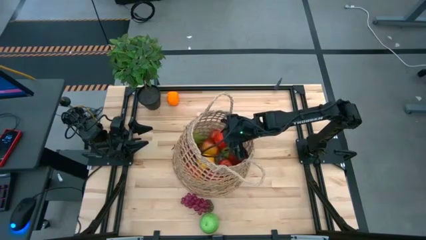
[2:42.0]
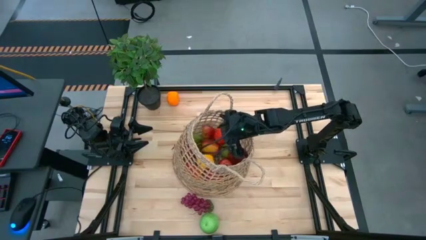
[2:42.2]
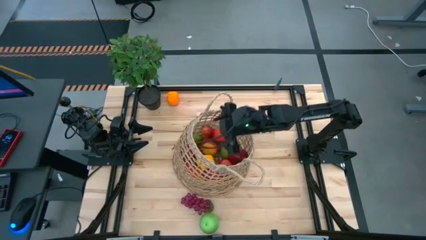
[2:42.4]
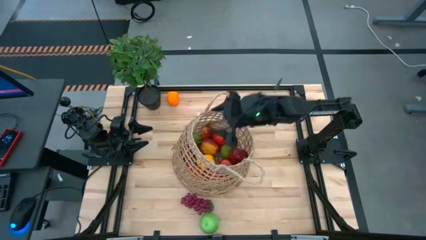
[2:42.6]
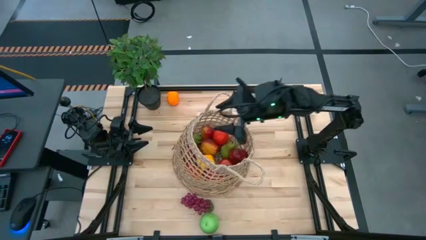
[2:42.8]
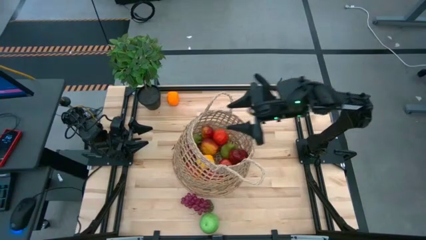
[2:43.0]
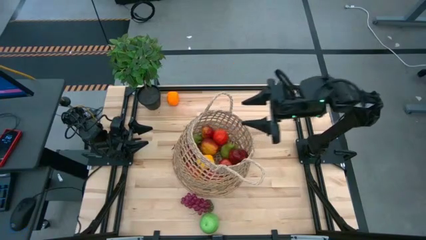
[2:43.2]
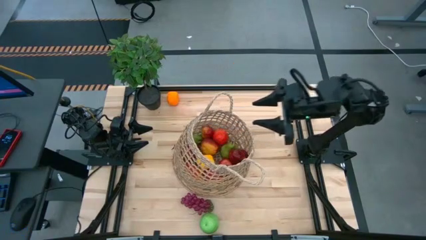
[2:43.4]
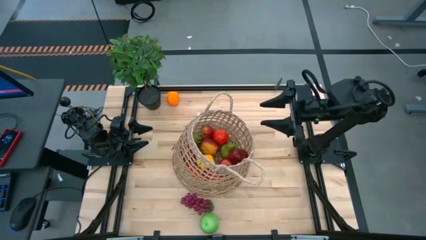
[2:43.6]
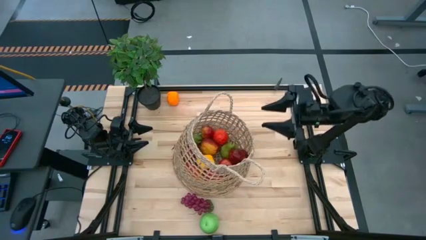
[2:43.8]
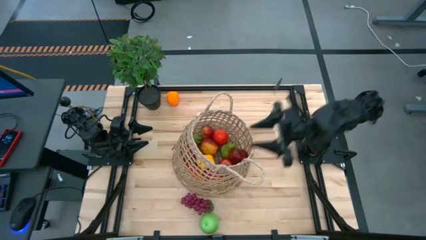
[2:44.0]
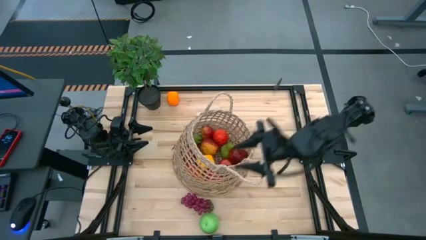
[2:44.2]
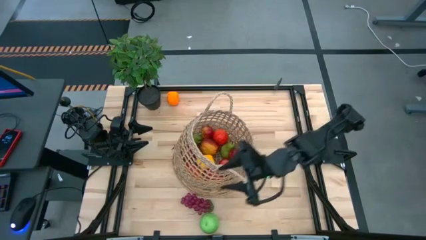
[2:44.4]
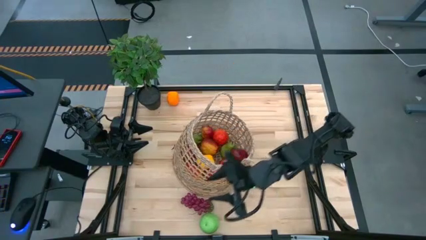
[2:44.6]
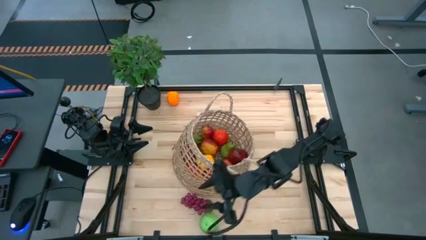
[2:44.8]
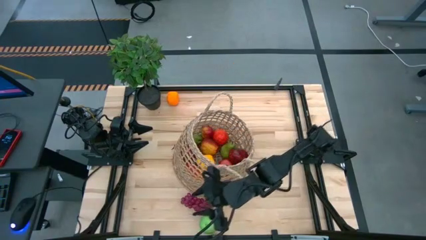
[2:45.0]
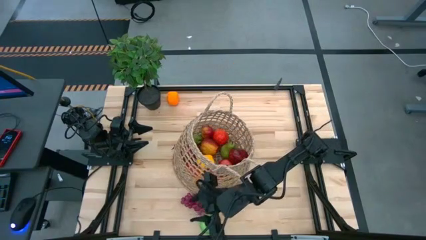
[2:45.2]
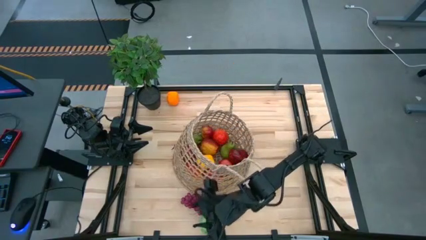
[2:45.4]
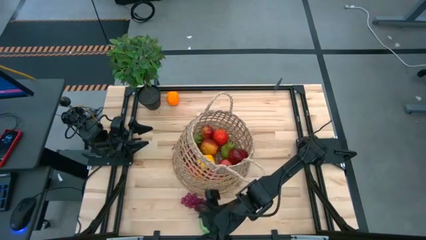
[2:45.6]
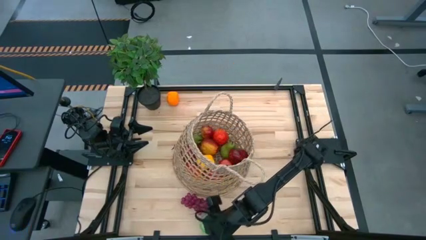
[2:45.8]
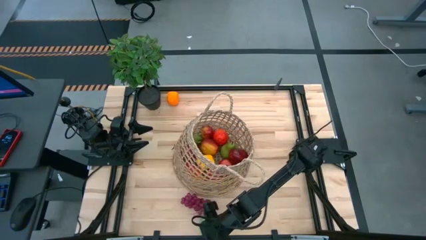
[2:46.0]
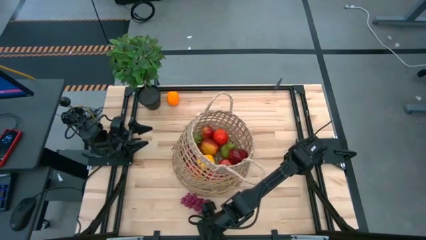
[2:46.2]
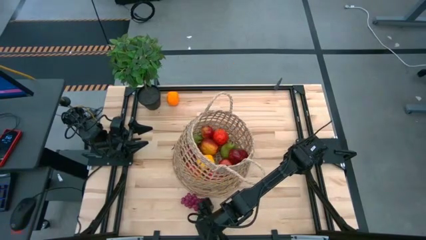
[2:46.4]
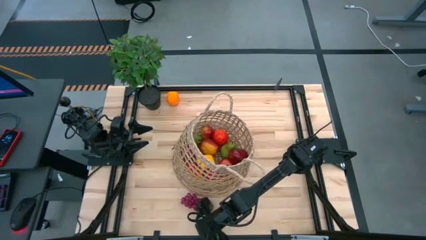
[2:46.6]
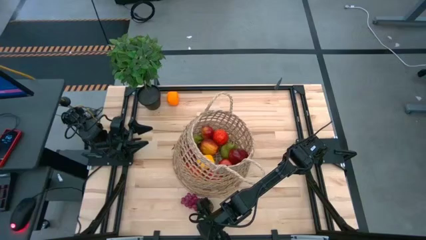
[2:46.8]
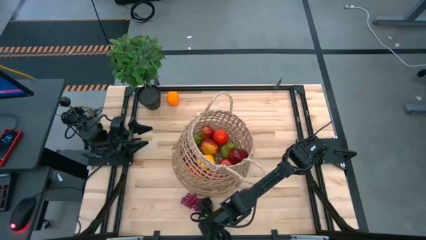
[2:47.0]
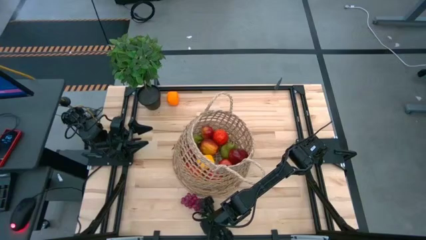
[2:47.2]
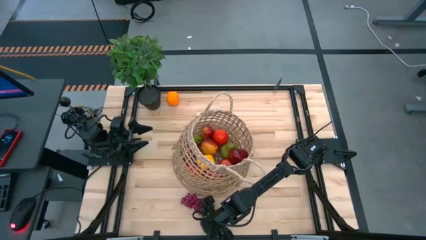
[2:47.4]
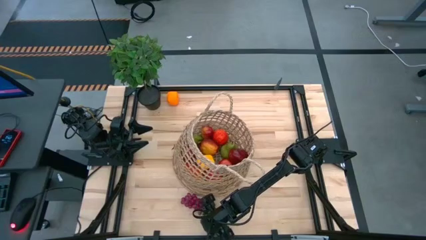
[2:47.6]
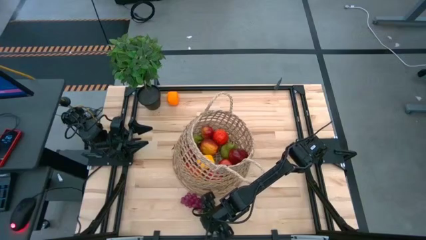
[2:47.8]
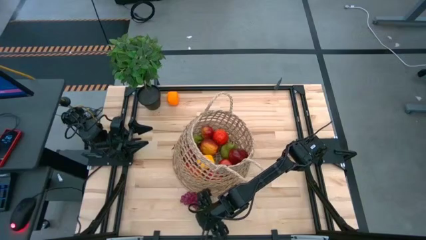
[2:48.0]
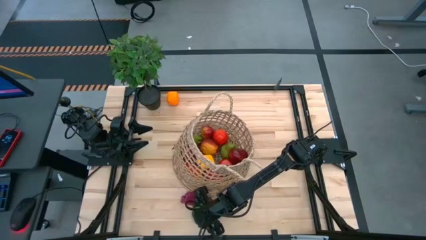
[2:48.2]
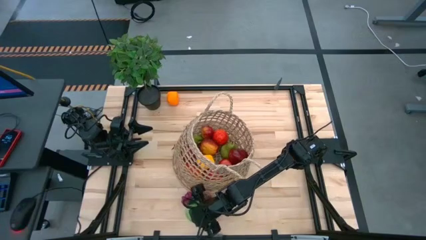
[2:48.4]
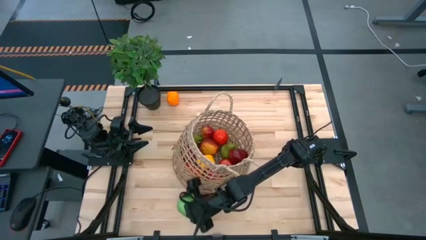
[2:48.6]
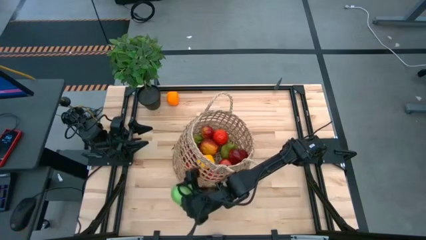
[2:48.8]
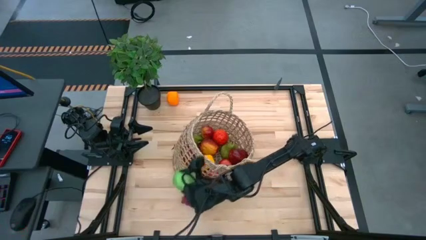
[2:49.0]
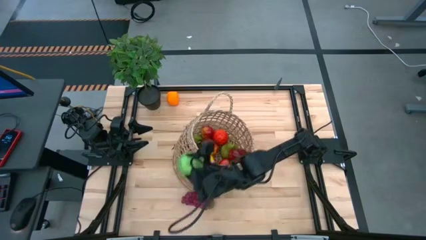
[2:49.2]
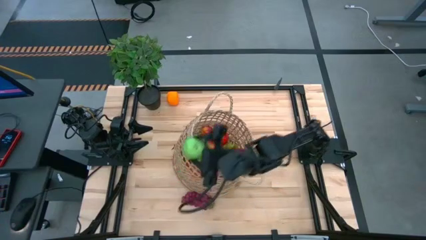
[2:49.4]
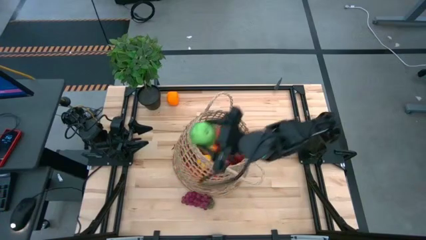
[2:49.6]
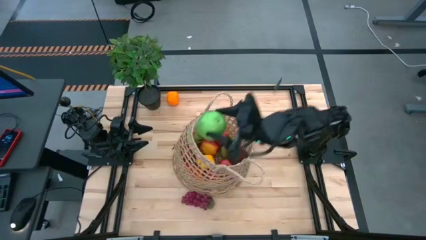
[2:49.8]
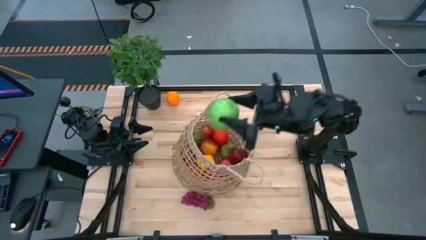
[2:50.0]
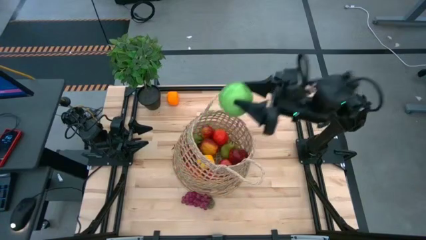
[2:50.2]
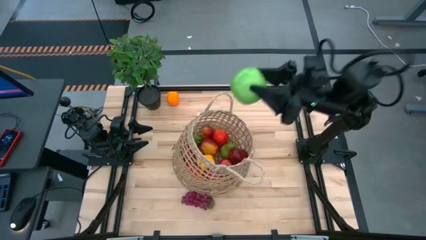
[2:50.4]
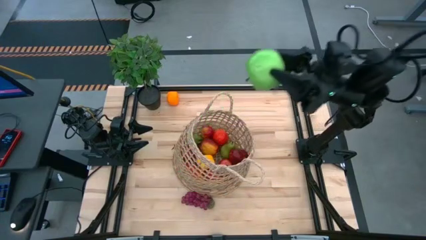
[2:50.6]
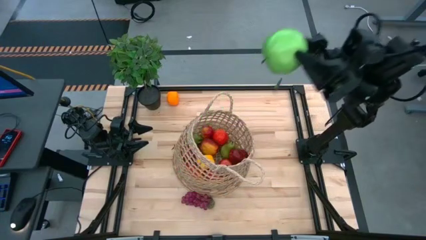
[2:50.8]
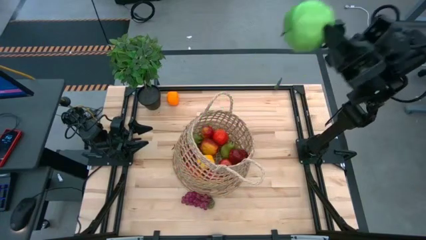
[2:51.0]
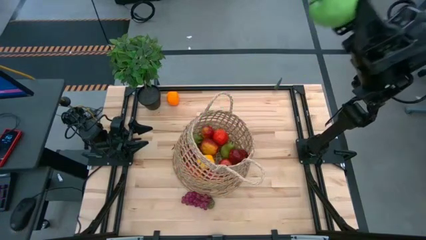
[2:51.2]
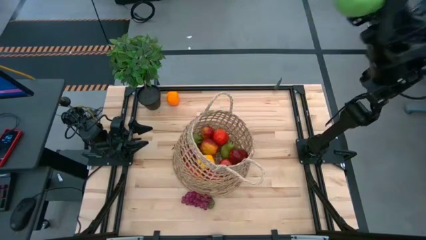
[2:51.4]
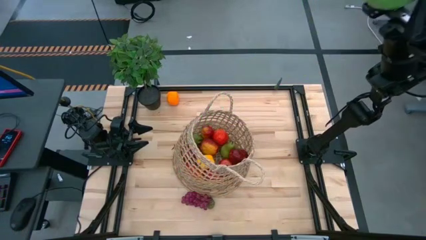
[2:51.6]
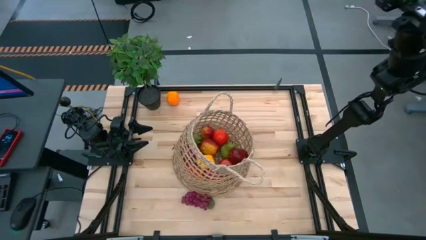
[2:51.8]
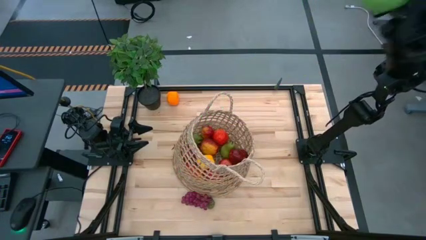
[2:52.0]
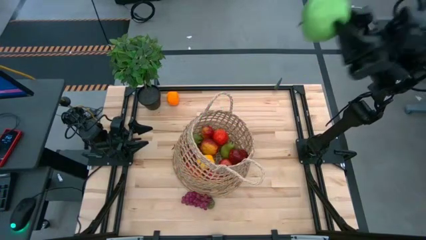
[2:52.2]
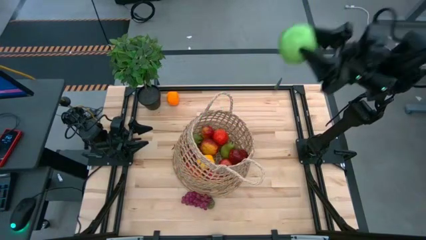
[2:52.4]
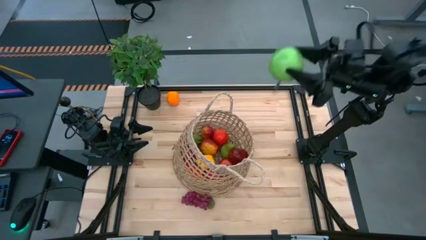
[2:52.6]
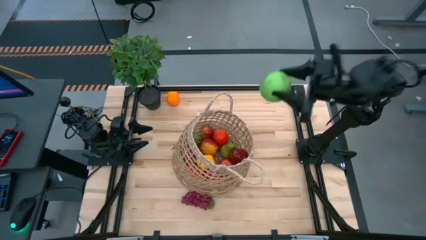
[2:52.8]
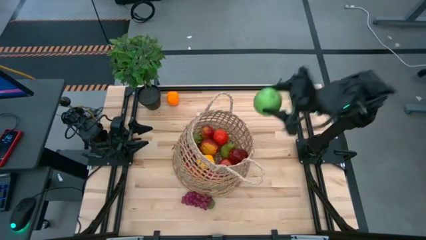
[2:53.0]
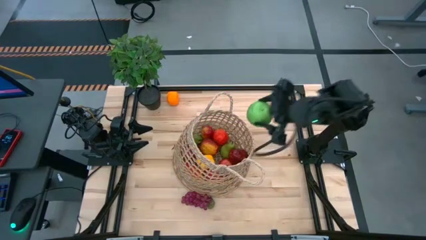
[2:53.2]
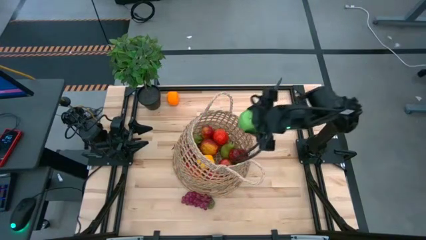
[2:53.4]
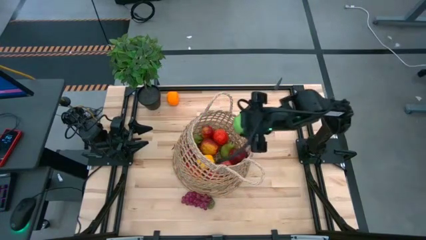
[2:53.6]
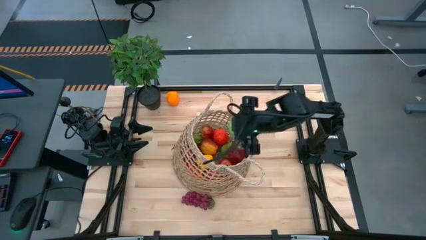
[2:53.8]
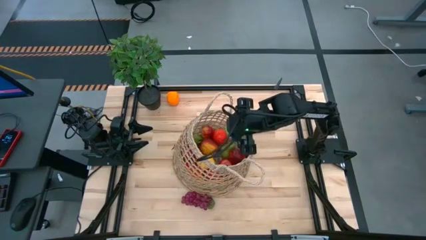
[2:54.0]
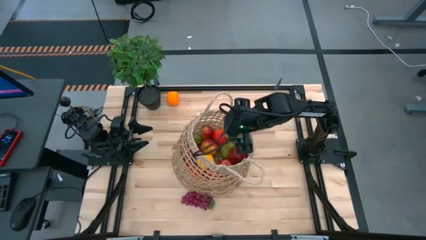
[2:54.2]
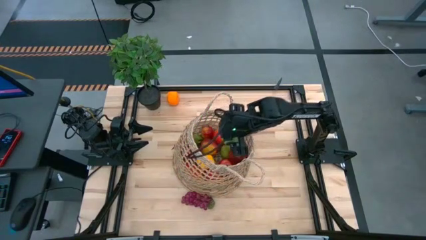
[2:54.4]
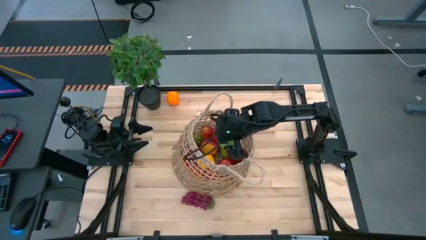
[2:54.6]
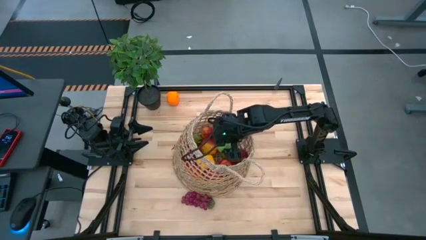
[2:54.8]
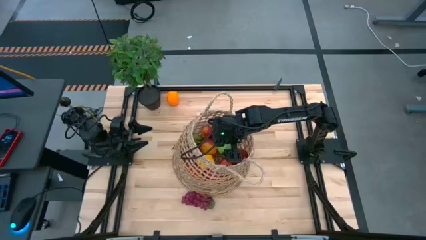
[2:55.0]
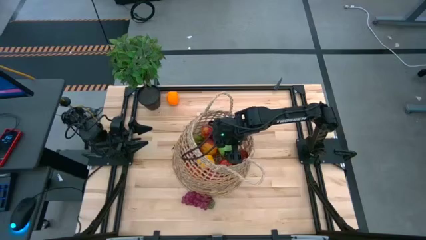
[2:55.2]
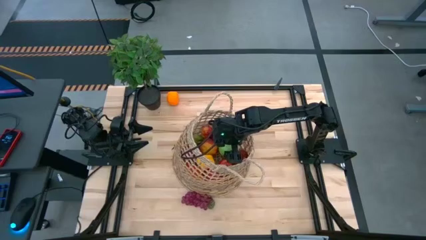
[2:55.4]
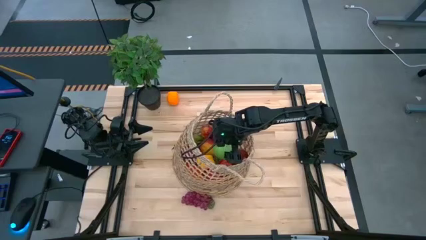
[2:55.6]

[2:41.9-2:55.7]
Task: Build produce basket
Put the apple into the basket

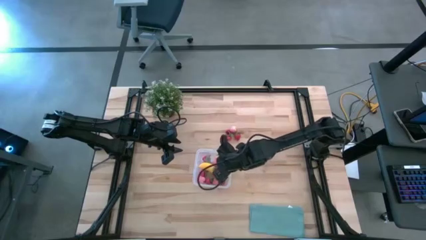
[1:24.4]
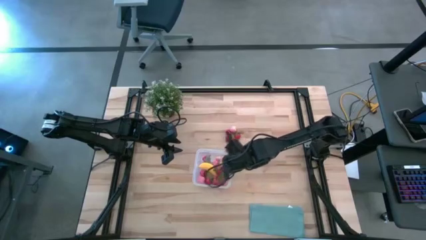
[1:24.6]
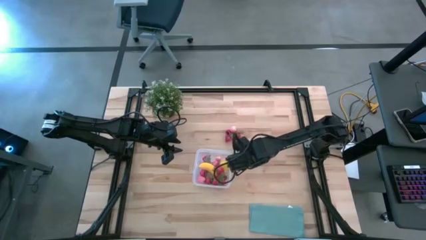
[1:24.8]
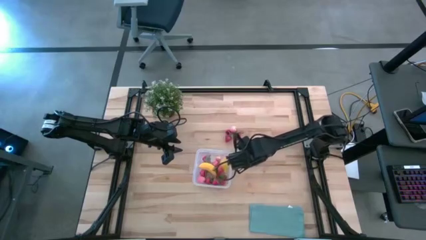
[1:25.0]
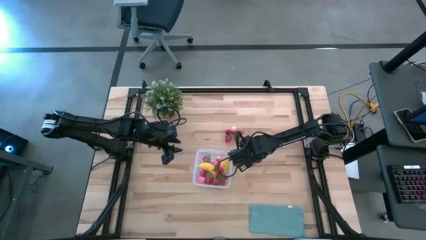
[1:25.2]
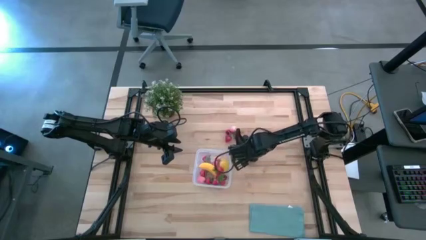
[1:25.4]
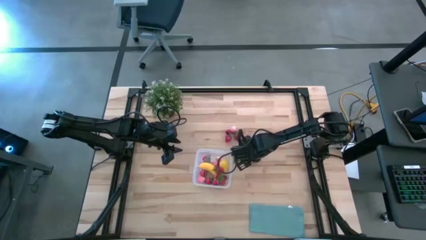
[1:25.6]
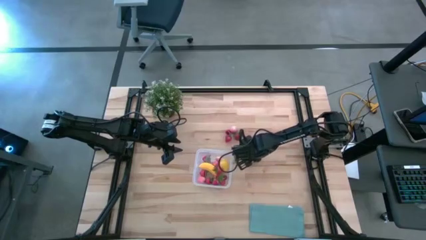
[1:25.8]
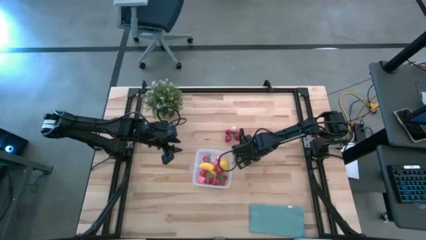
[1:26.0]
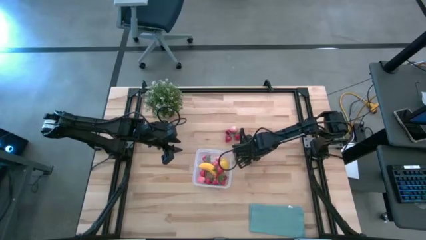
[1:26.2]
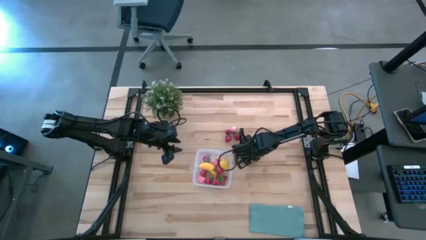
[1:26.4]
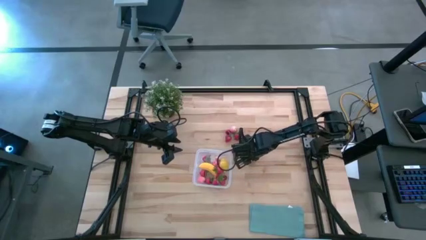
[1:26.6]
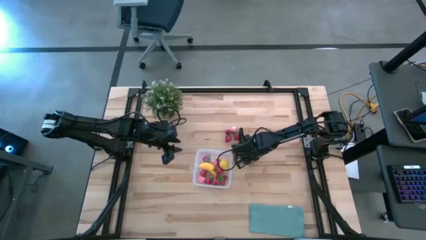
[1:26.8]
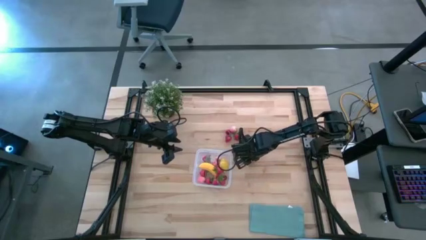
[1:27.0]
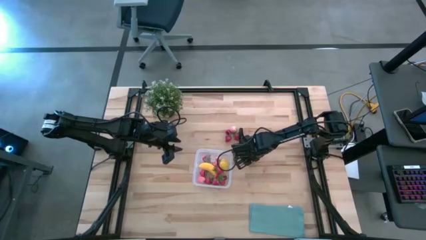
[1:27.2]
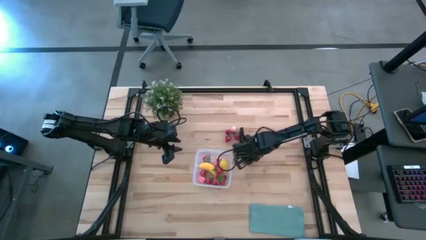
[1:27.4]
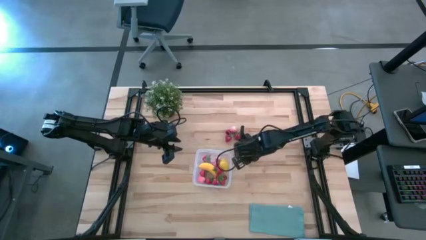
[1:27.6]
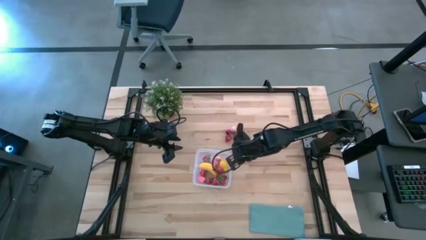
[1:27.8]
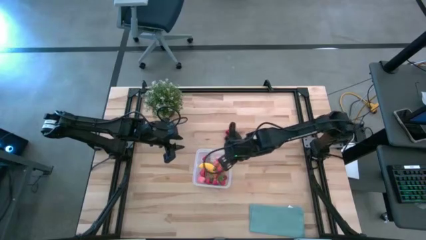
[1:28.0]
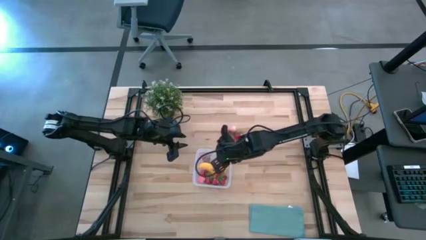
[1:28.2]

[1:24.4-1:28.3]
Task: Pick and placing Produce into tupperware
Put the pink peach into the transparent container
